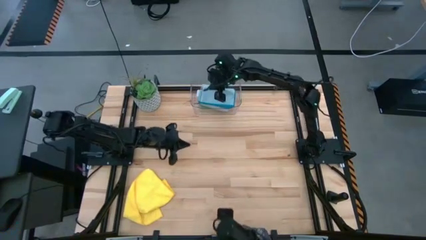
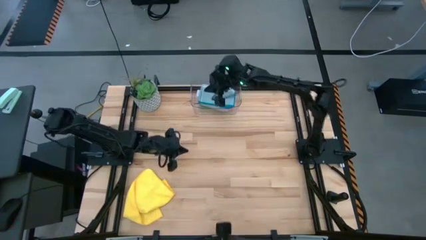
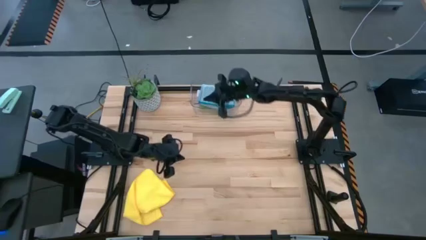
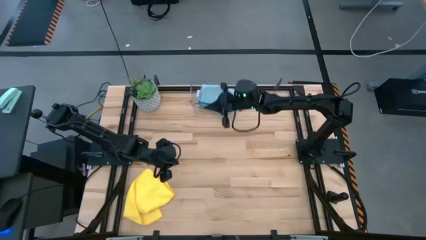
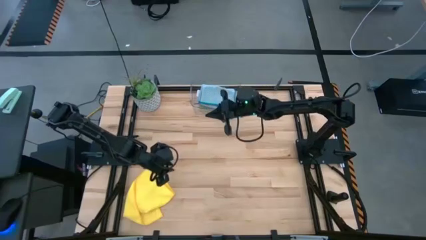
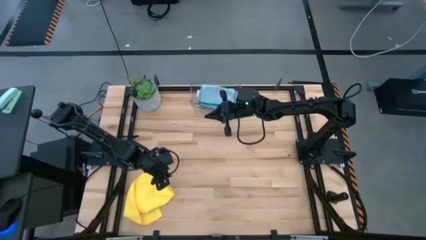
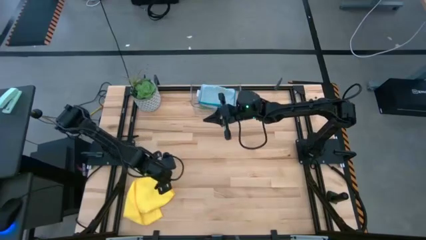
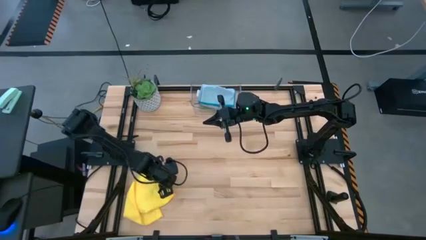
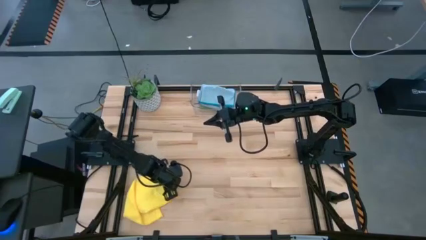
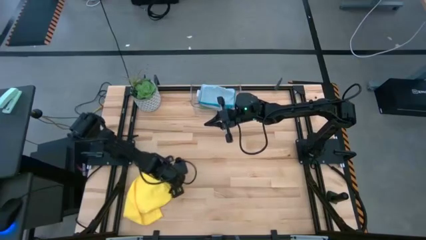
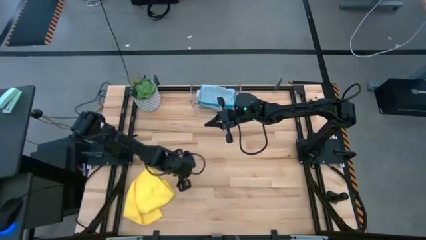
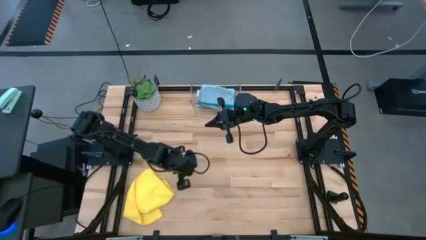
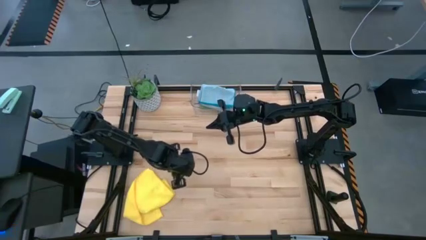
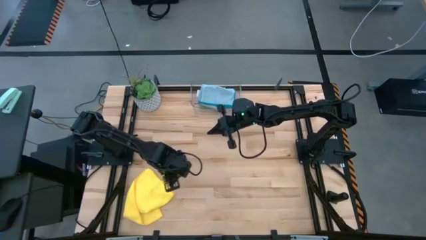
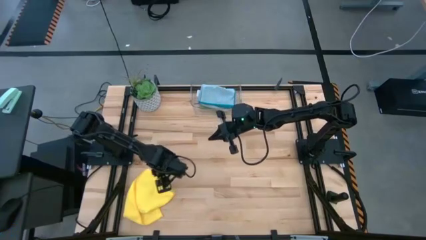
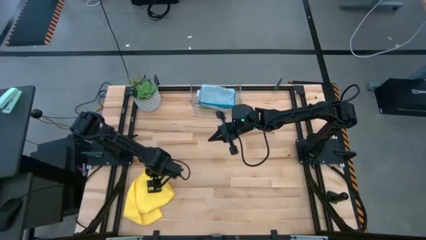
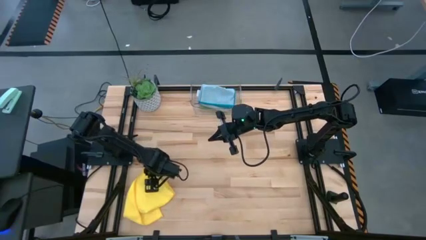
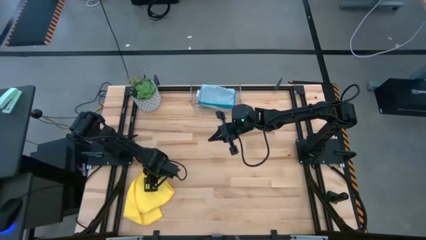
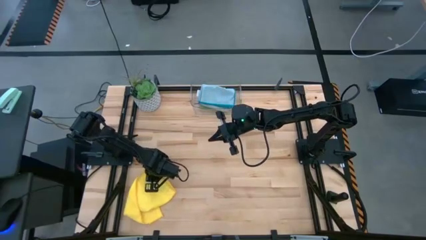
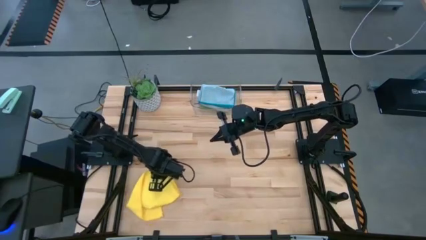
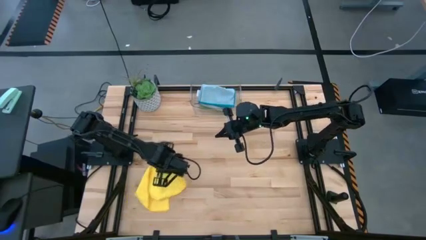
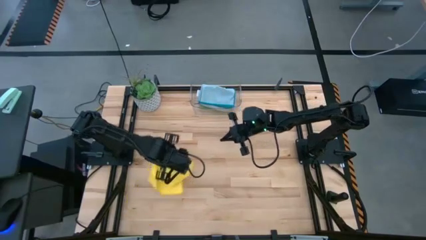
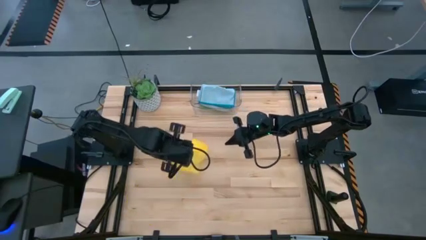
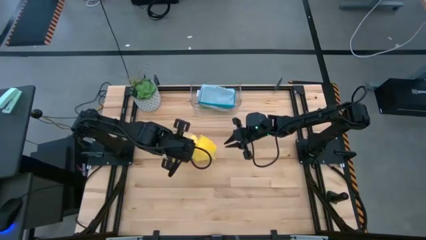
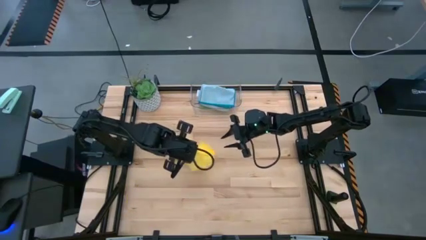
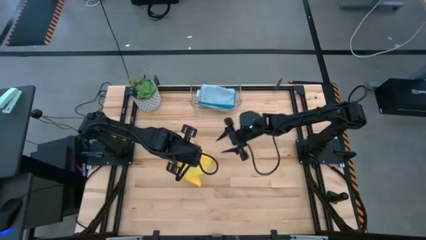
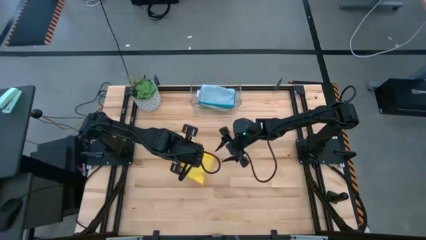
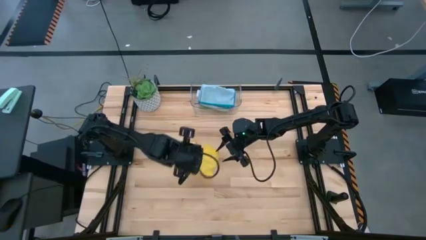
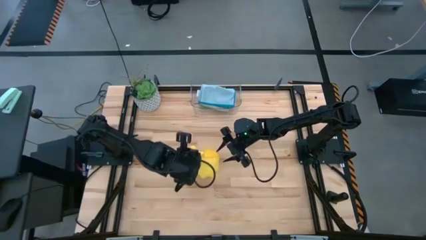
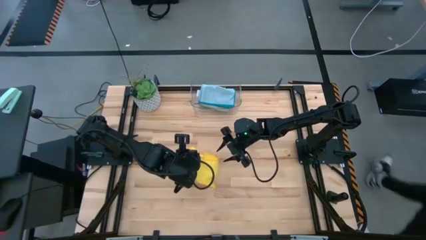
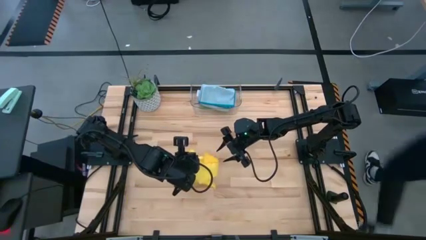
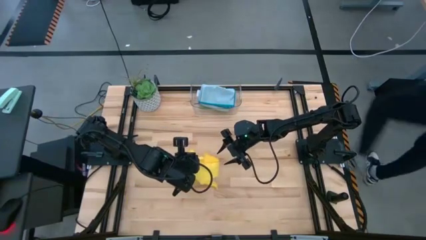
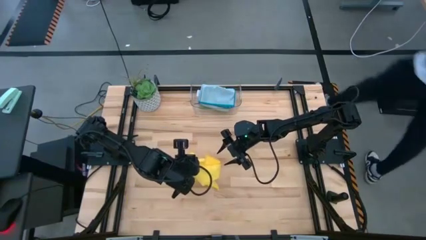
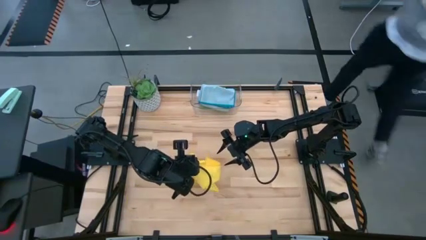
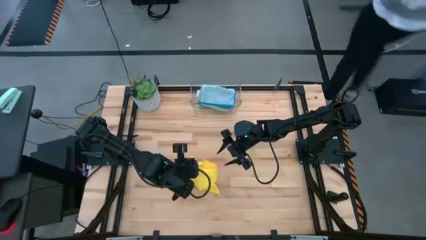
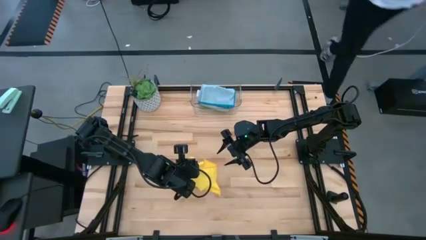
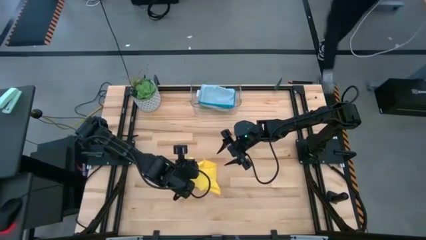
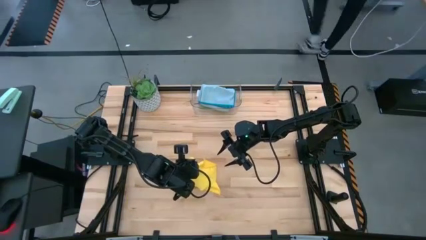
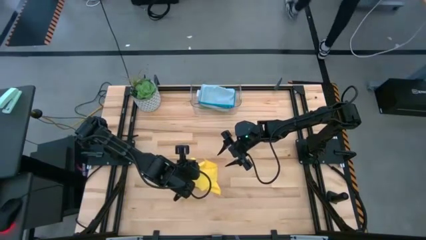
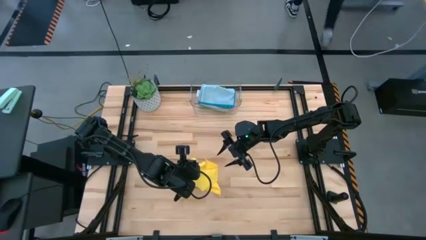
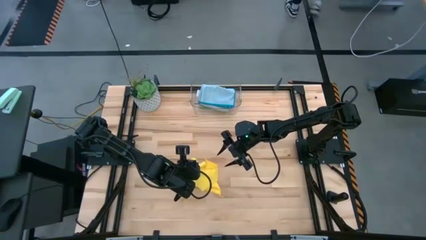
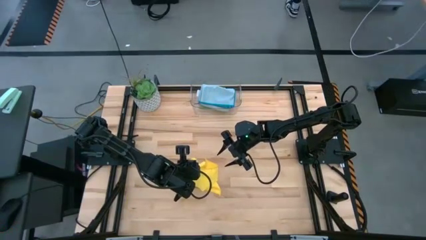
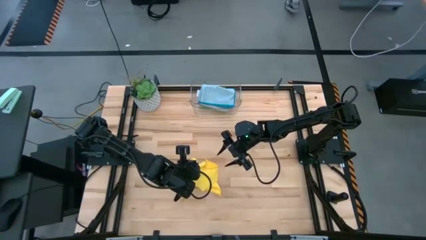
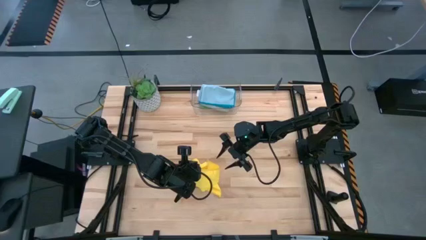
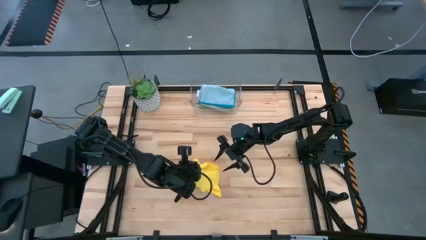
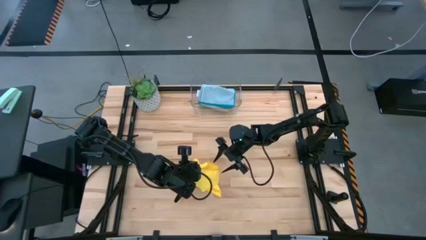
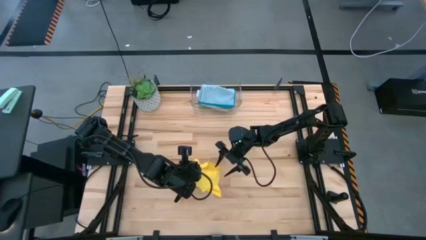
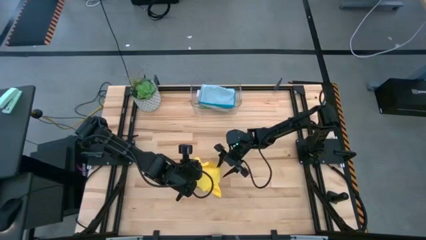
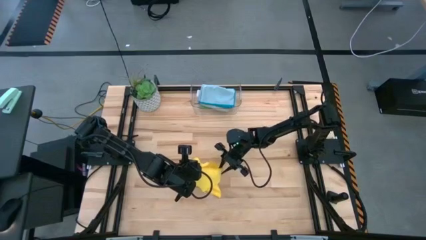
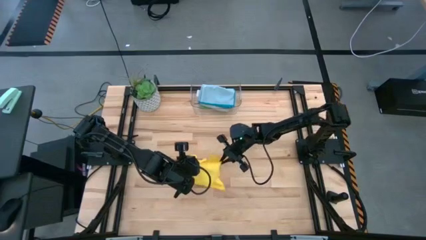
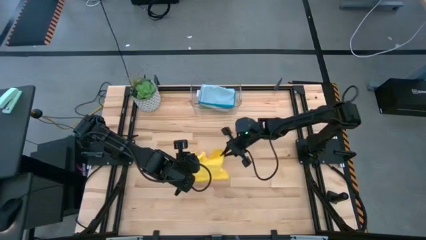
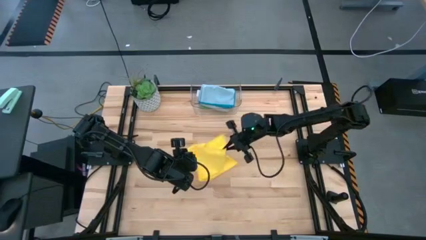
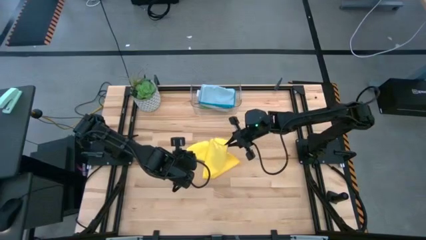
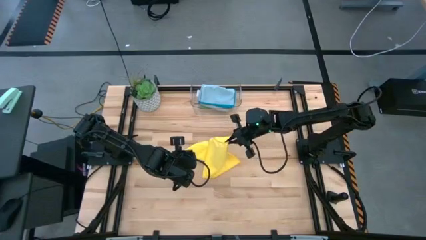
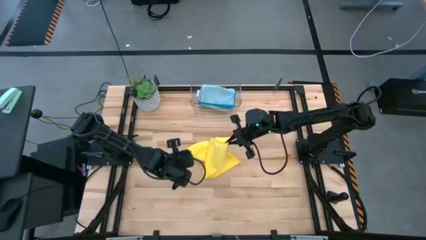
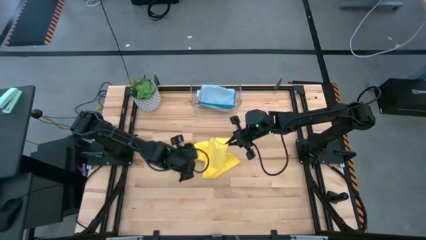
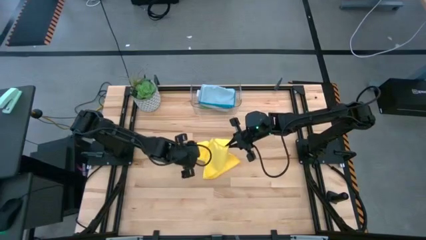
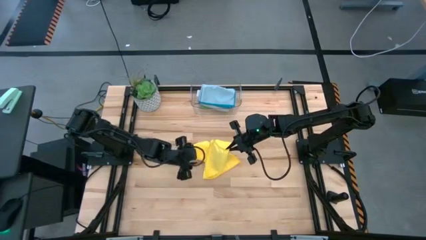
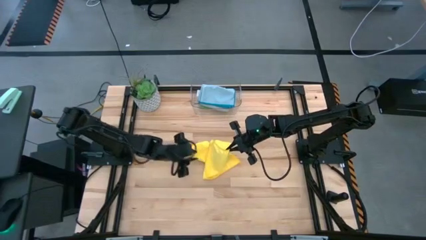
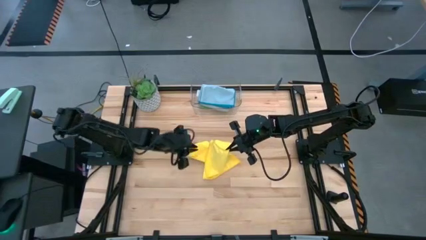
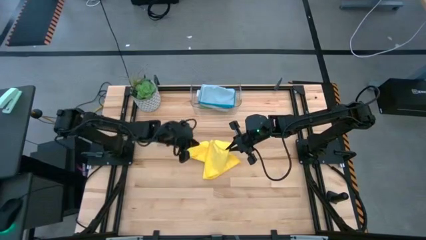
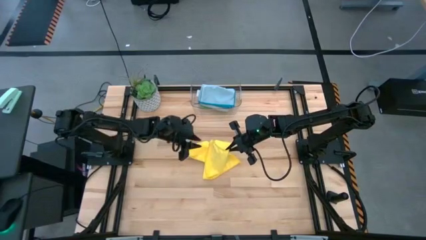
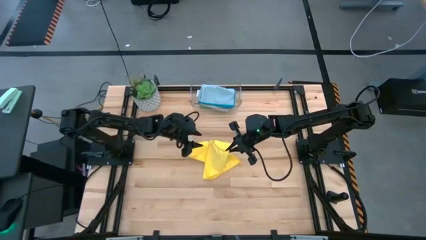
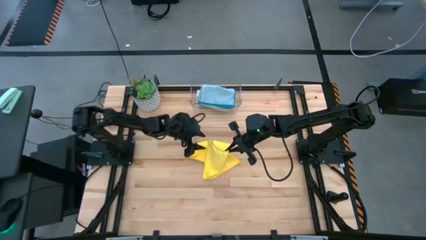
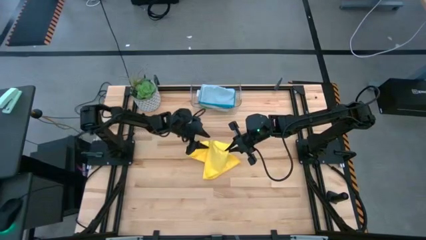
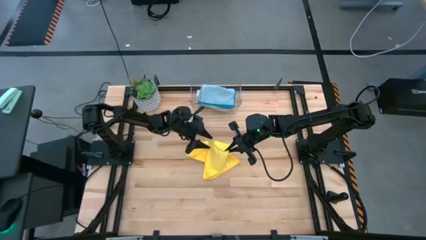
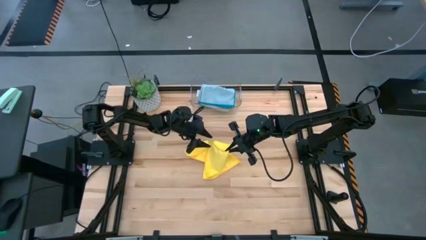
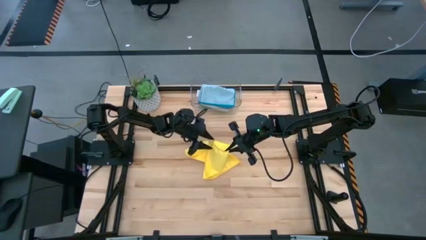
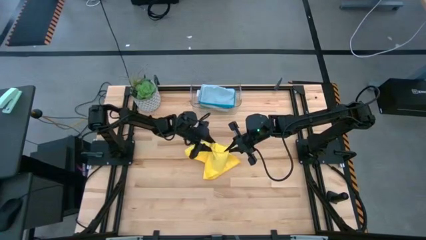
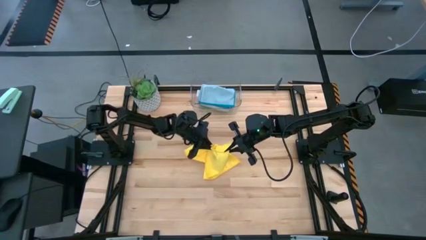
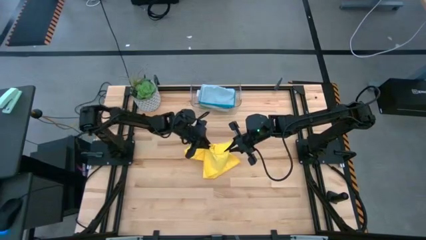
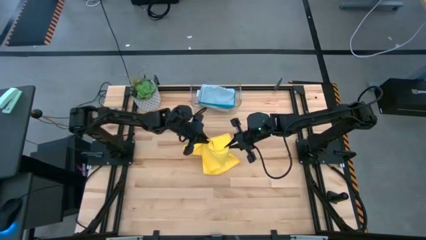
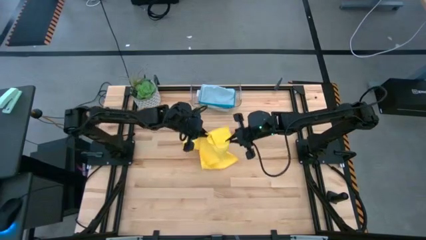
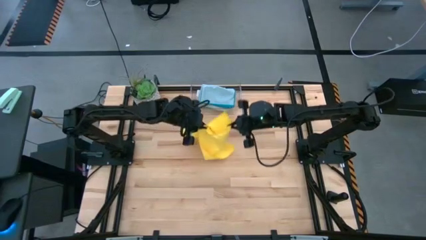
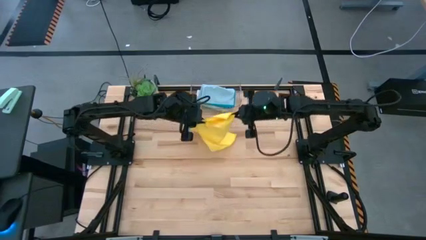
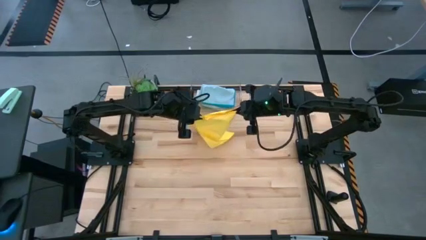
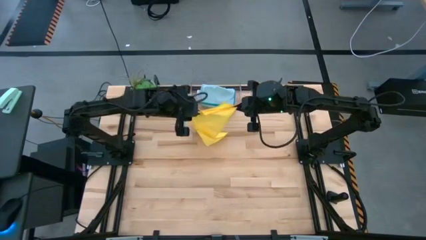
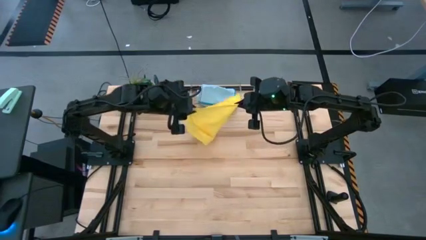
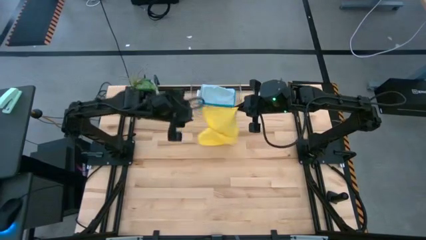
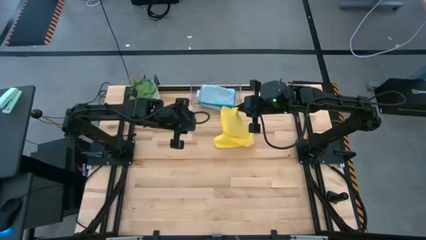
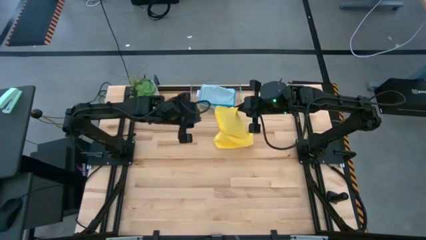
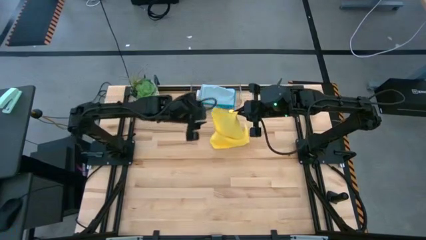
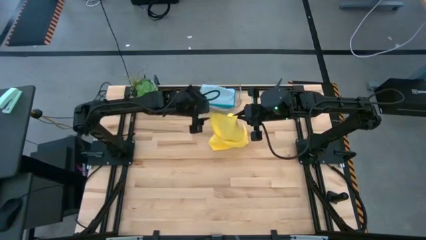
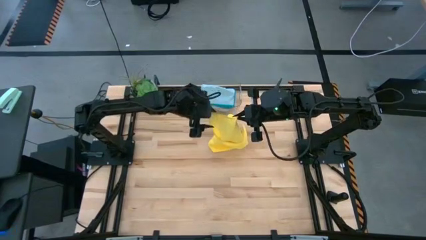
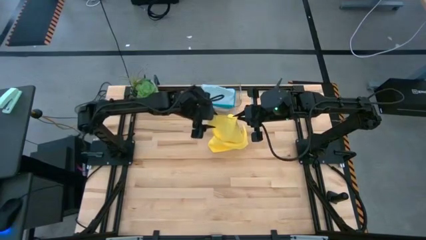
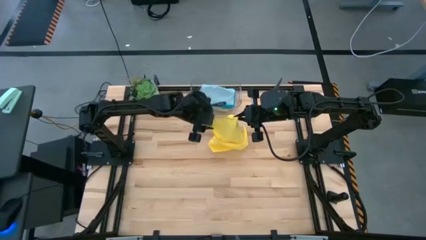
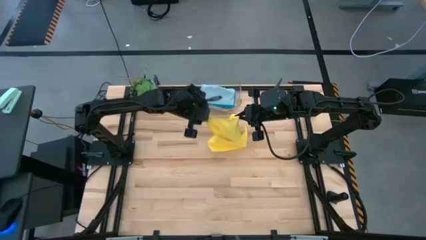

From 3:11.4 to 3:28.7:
Task: Fold microfiber towels
Fold the yellow microfiber cloth
